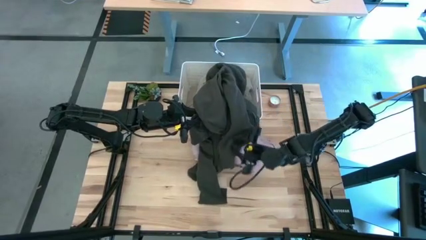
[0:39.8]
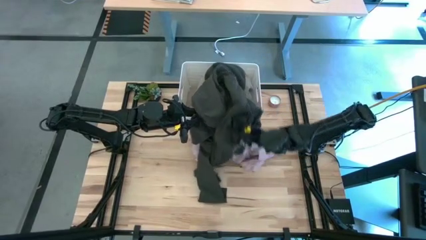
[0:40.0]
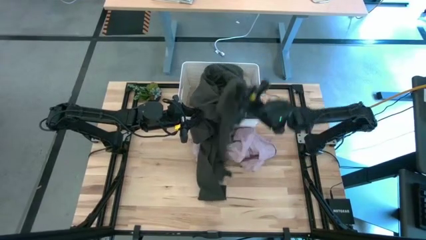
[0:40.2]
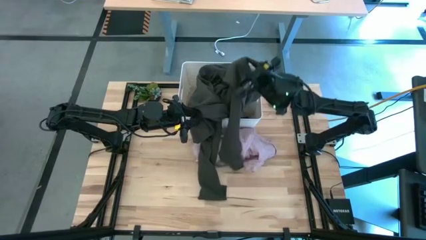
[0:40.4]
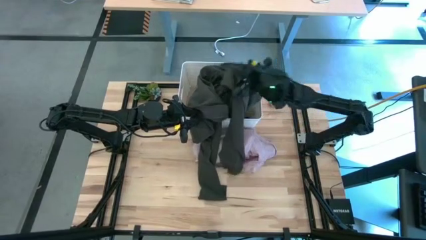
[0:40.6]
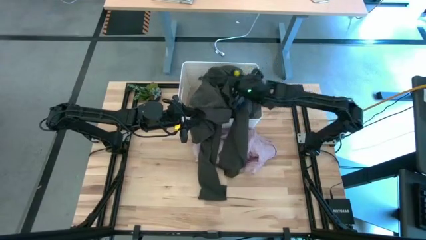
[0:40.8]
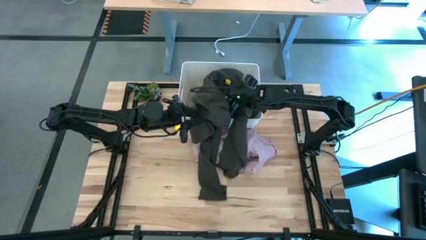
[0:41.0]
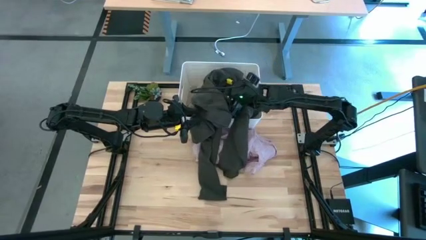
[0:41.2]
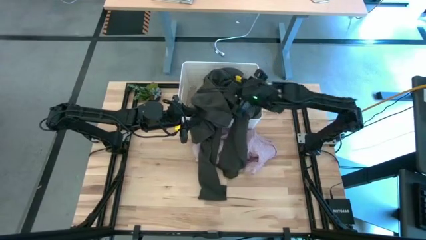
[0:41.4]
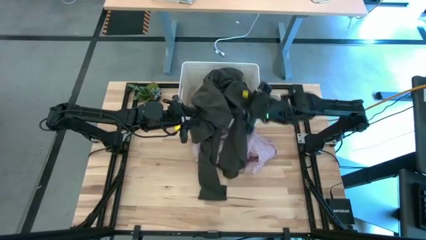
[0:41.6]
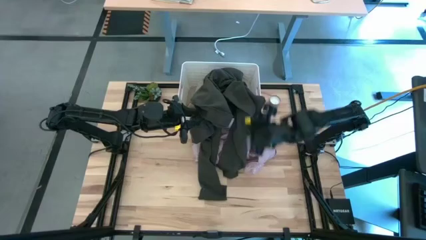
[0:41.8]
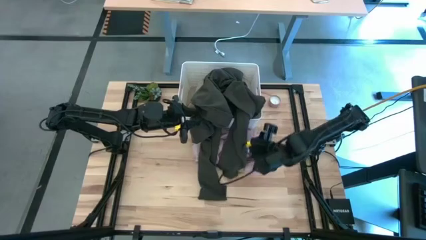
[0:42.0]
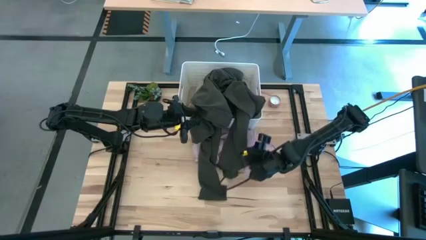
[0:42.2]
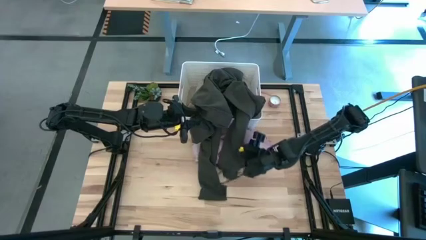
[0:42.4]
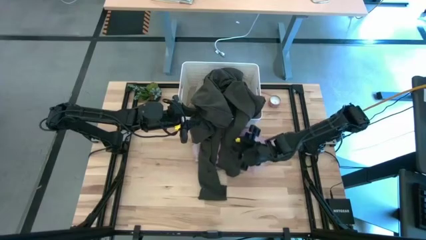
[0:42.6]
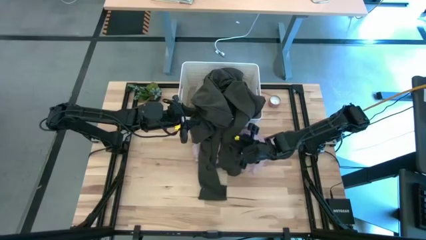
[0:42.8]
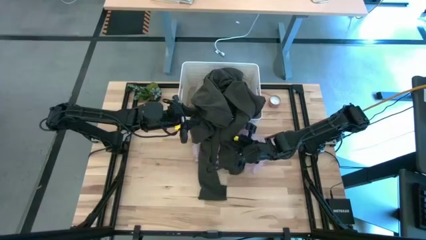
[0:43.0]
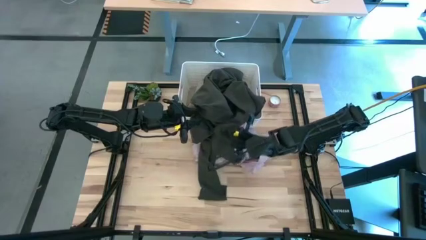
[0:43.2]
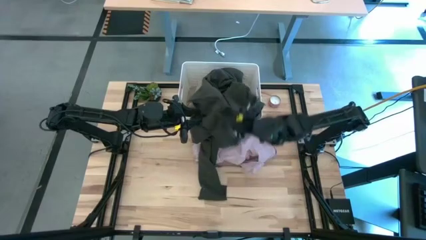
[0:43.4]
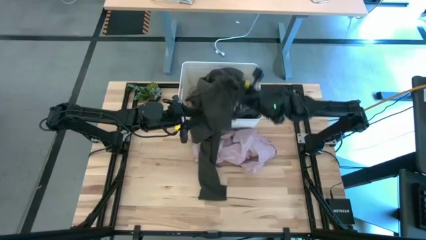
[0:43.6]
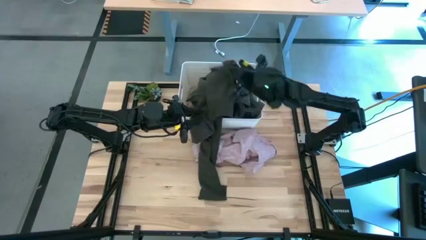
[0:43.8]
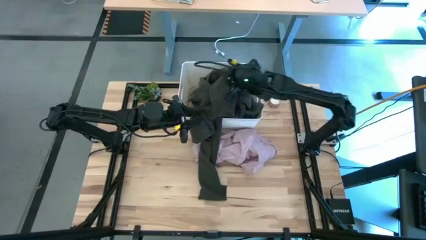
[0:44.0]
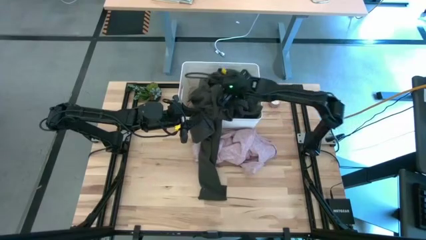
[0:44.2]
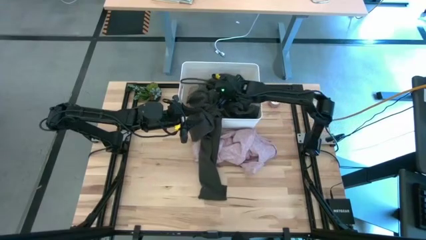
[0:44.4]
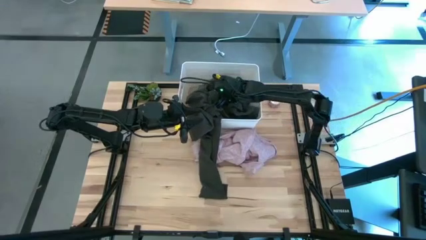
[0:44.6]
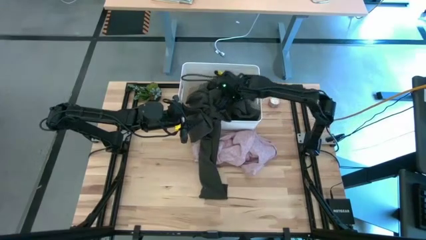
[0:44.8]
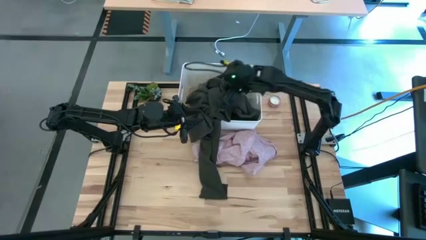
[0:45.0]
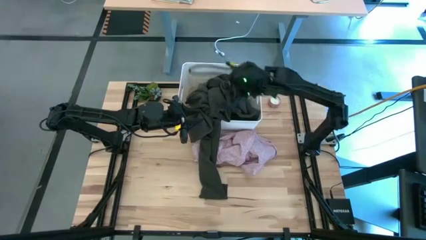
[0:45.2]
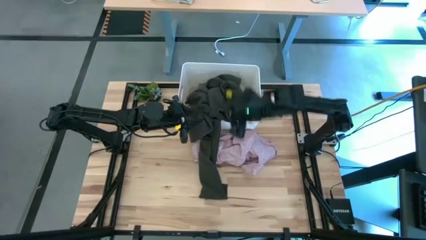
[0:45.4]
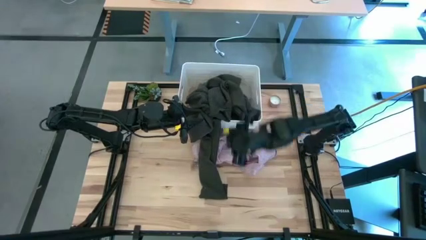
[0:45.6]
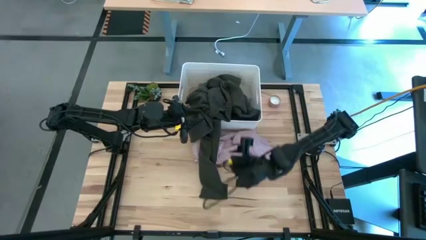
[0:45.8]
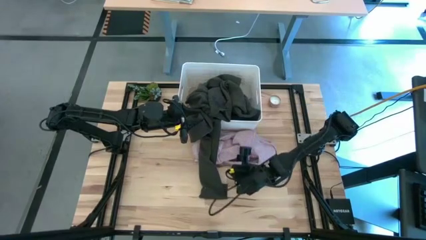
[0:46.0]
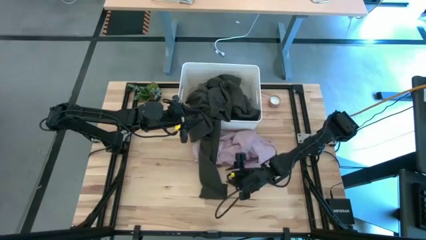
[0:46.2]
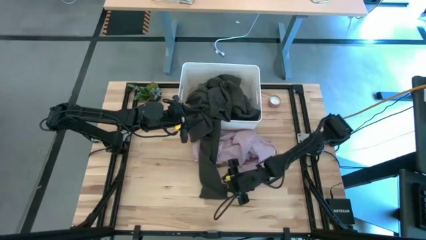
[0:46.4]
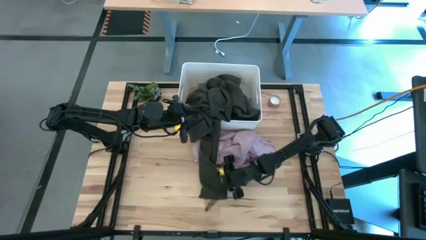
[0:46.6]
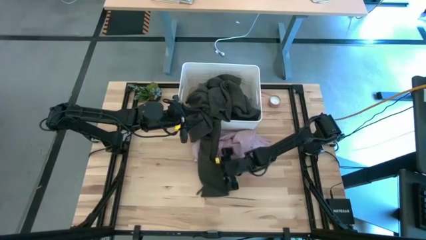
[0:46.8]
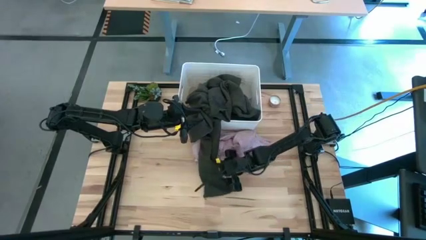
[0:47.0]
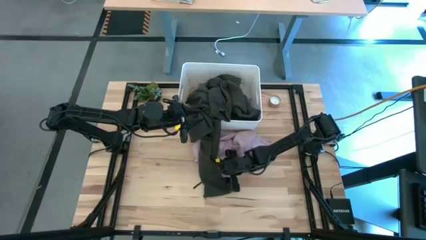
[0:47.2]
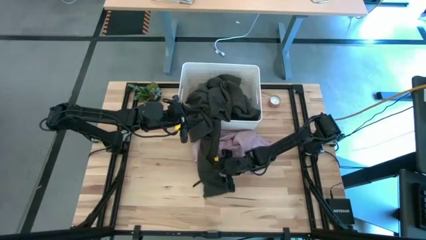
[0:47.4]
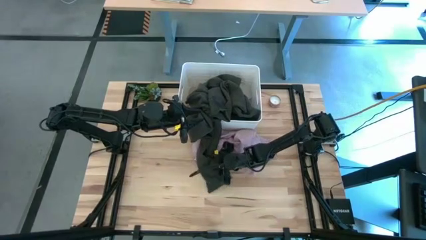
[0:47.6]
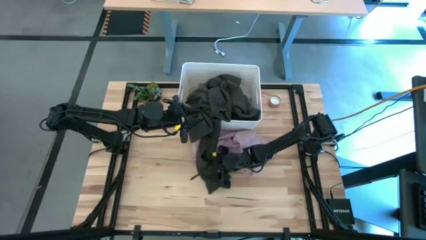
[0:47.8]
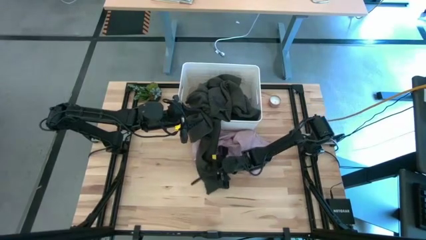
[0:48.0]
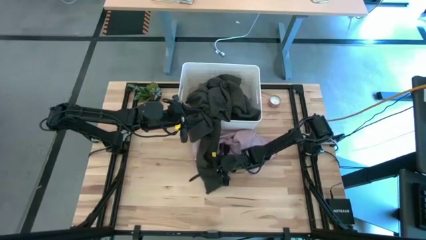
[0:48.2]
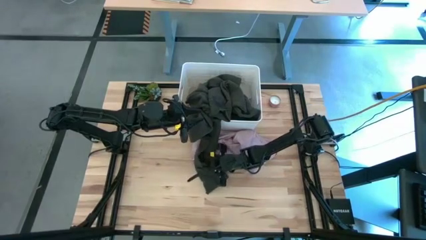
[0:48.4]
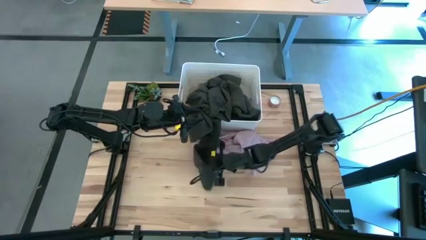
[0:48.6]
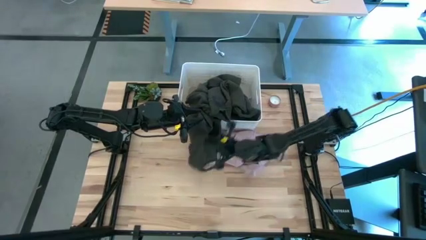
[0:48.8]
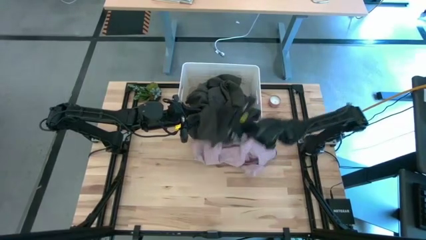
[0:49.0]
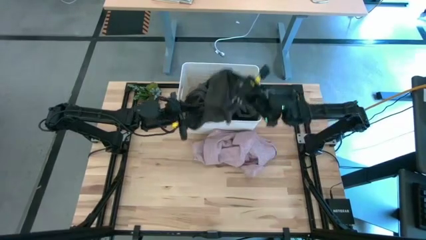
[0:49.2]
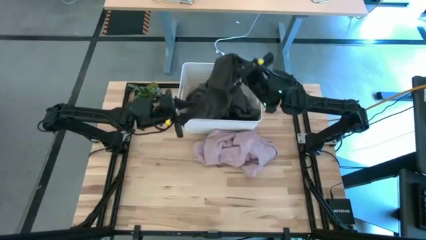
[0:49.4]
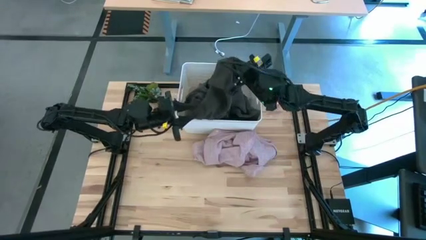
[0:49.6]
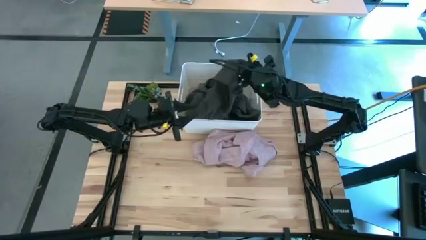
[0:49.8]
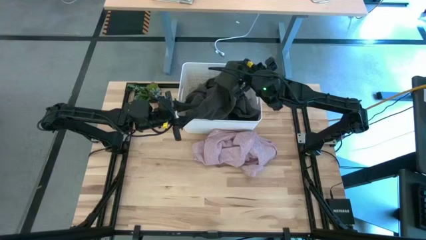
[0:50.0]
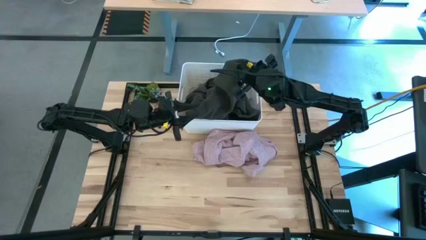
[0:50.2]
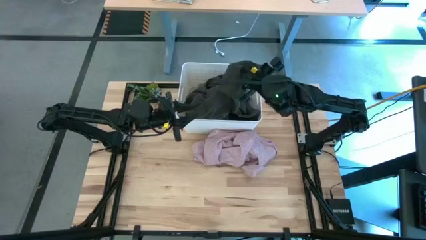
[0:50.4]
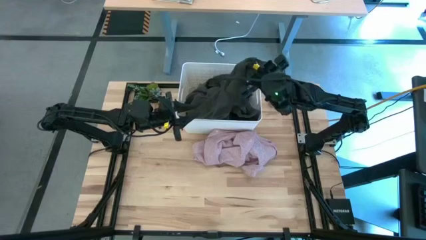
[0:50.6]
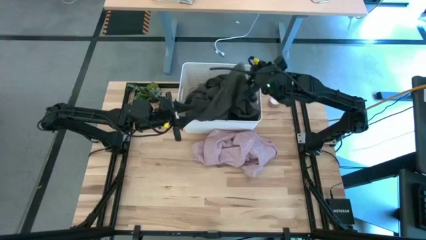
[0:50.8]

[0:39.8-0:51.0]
Task: Sort clothes
Put the gray jacket in the white bin

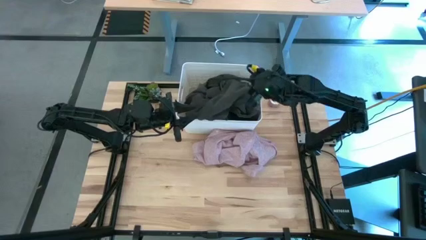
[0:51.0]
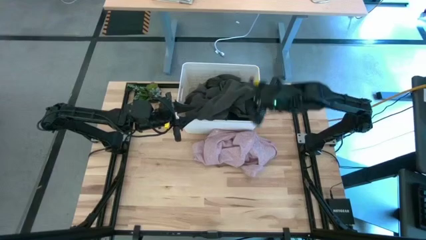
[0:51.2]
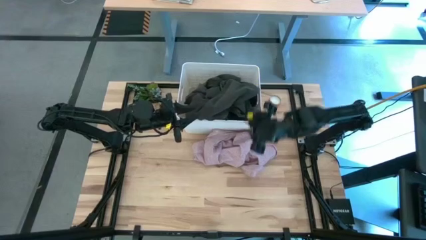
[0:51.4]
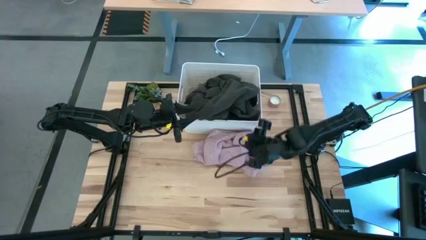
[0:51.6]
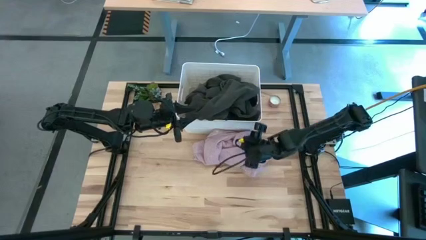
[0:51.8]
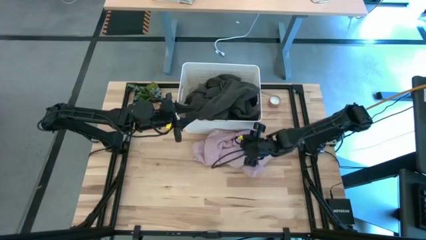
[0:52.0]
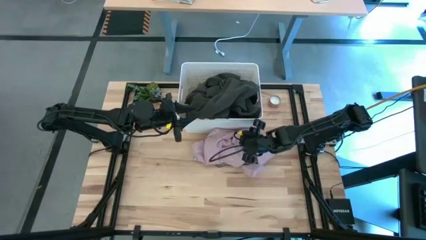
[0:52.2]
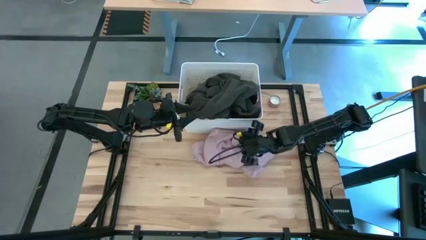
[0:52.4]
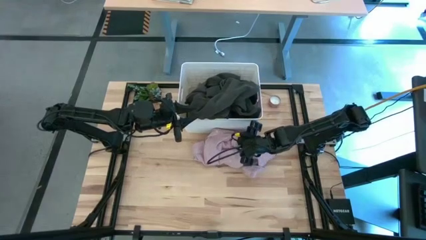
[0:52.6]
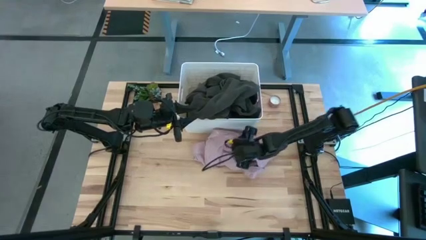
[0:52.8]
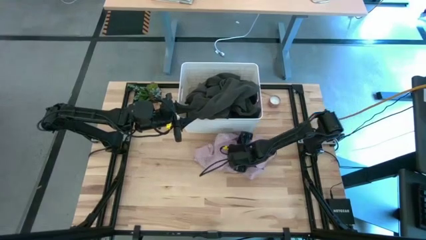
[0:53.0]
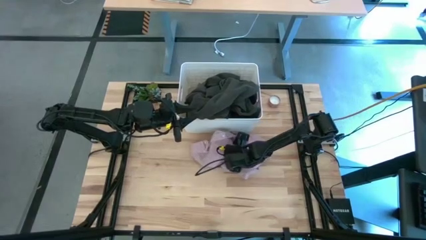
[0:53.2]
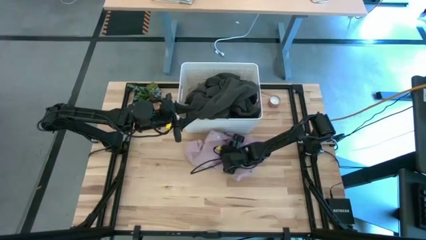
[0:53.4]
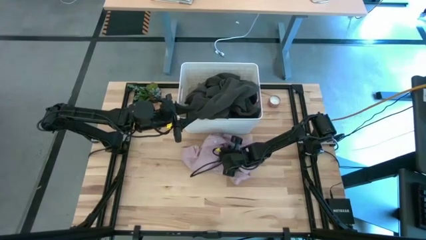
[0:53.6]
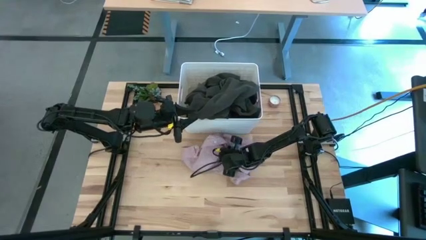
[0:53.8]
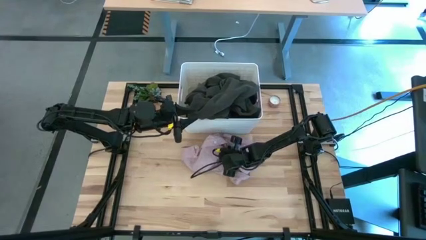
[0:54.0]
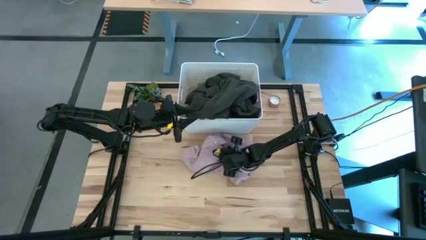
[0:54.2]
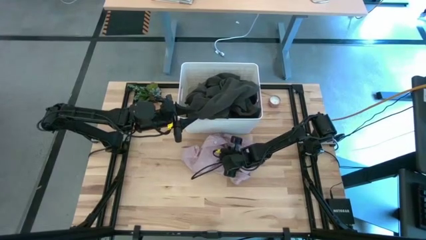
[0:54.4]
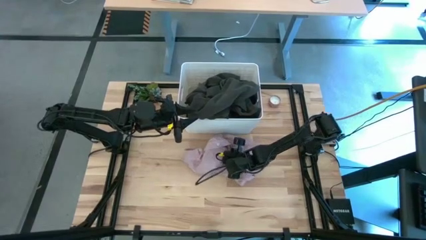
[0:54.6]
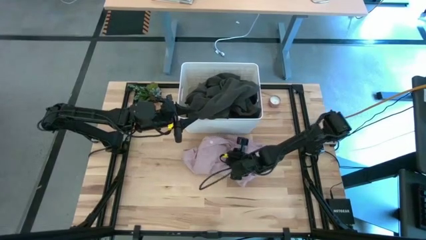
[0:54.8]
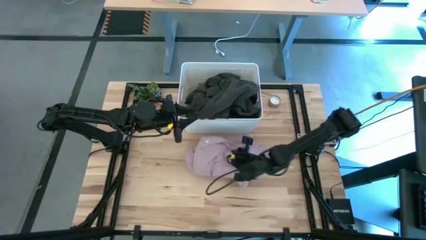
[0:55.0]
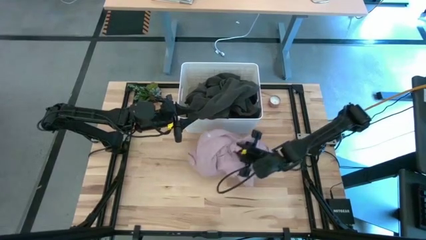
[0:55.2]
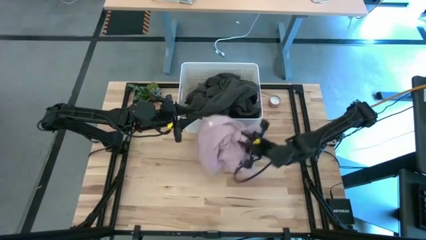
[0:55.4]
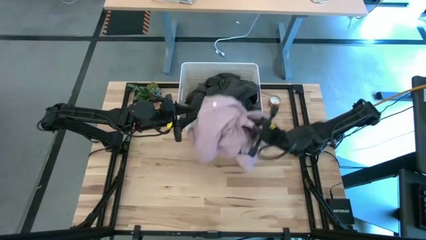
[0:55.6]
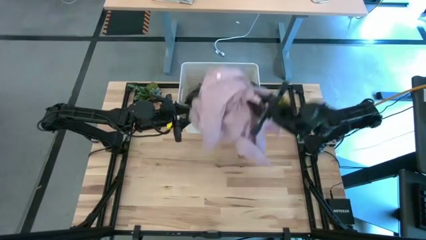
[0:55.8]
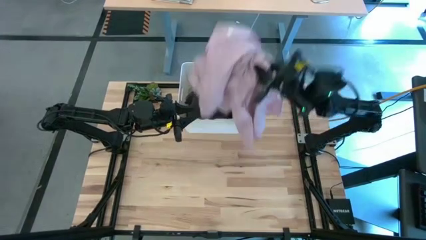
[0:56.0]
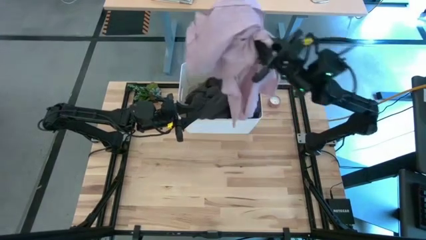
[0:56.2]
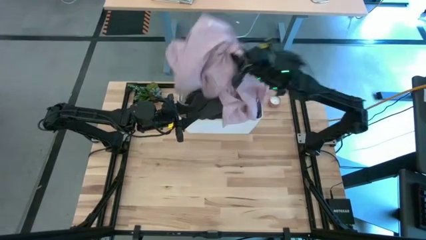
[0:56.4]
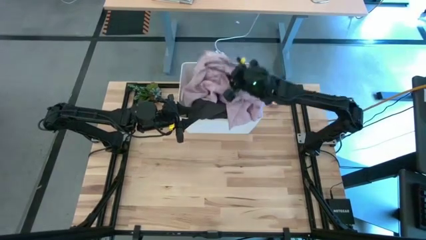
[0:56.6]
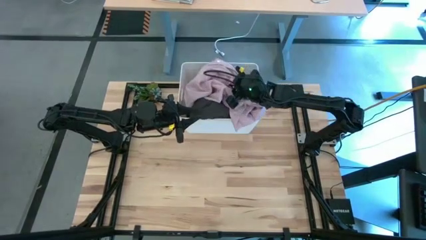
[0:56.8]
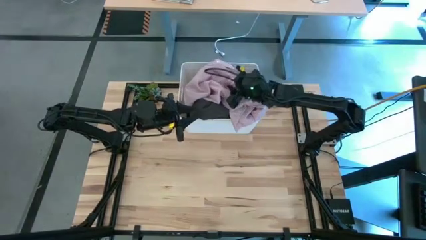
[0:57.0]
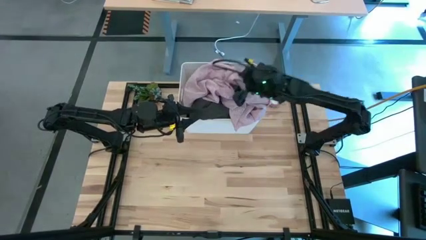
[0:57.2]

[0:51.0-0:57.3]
Put the pink shirt in the white bin
